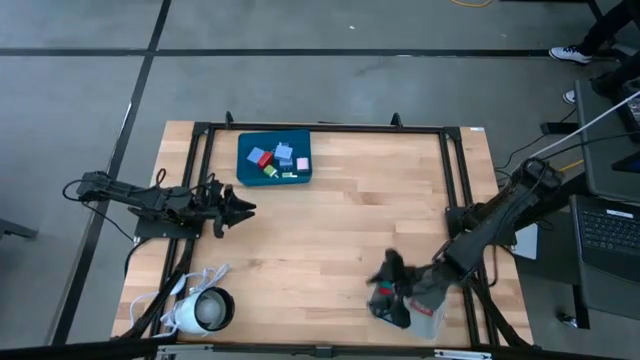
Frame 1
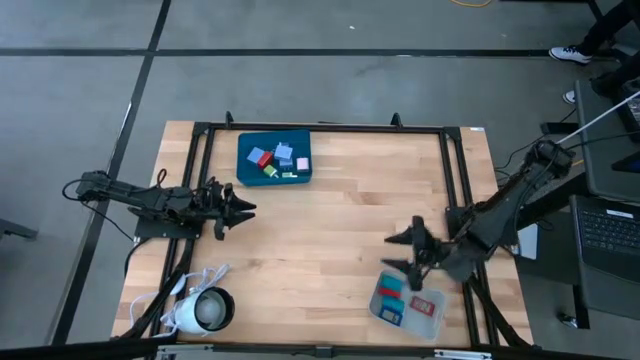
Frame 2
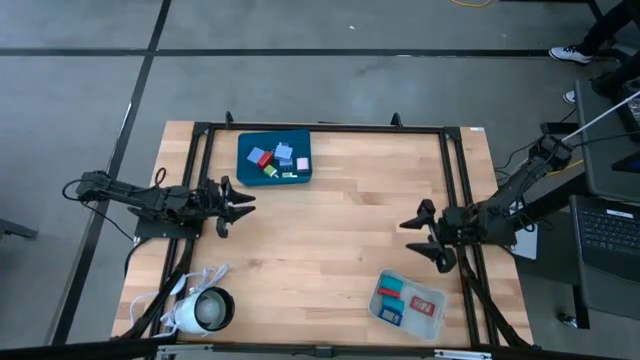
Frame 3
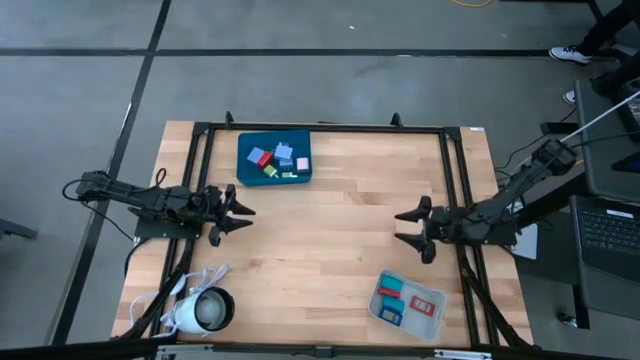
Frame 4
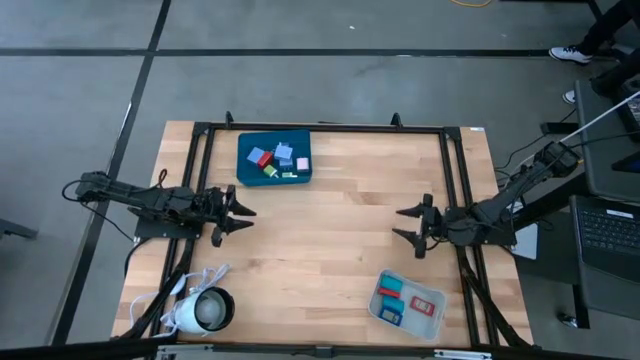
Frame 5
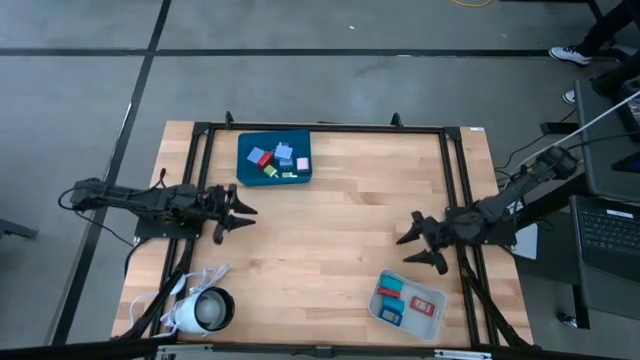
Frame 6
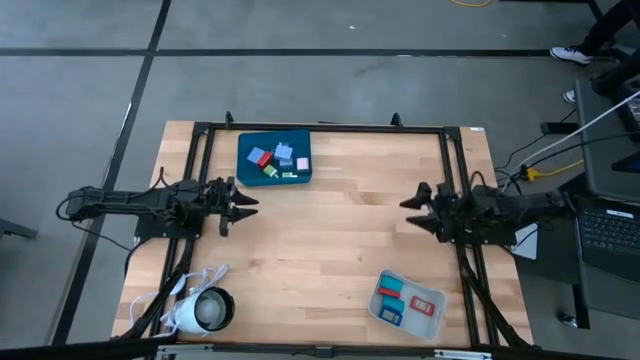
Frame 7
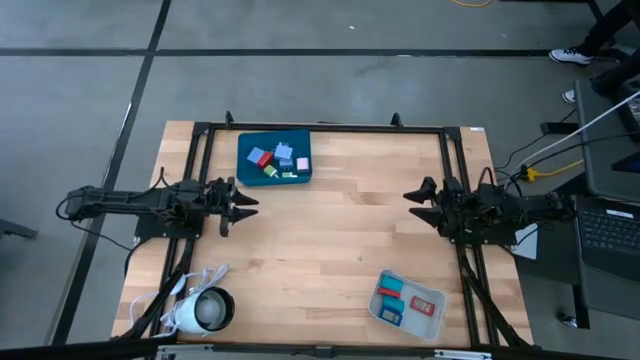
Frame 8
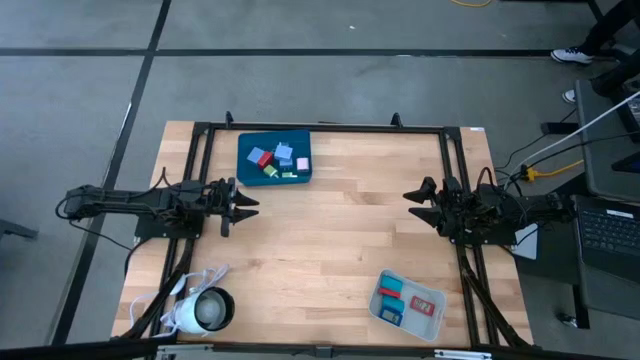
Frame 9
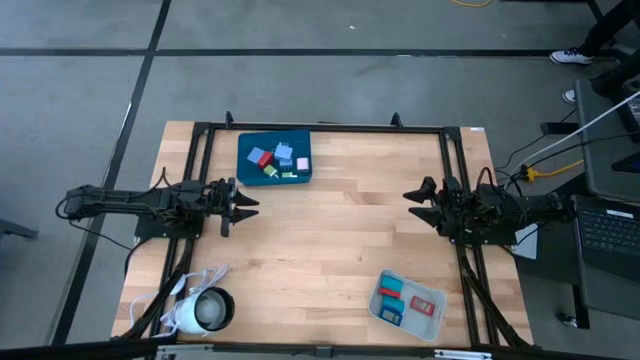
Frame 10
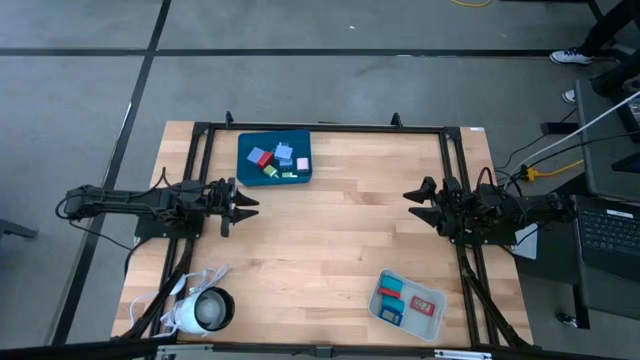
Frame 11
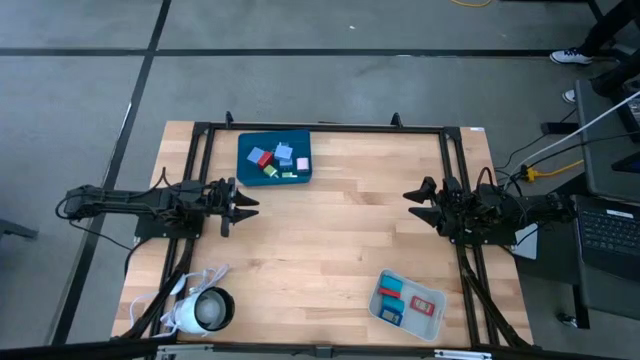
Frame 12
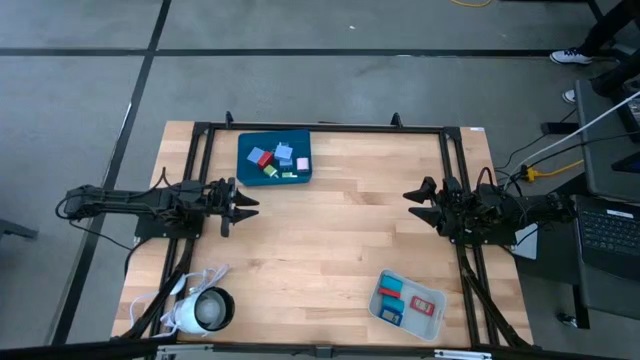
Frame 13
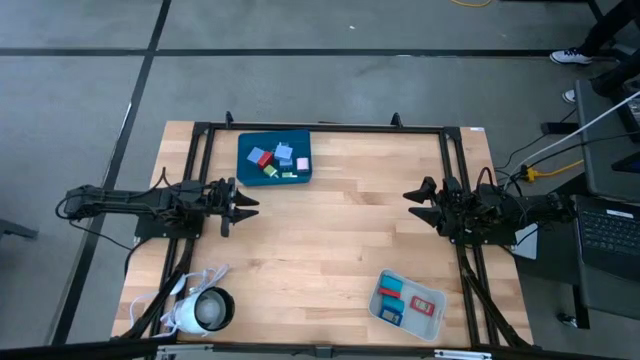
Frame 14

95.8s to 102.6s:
Task: Pick & Place Office items
Return to Home Position

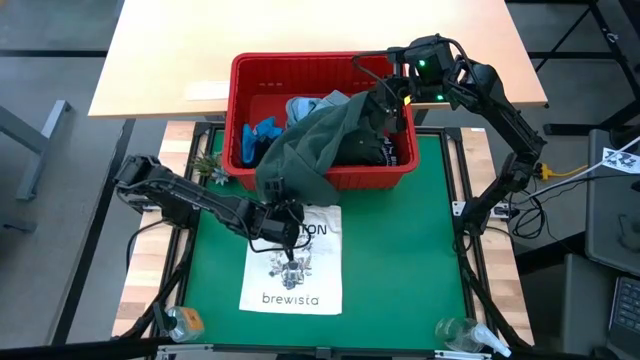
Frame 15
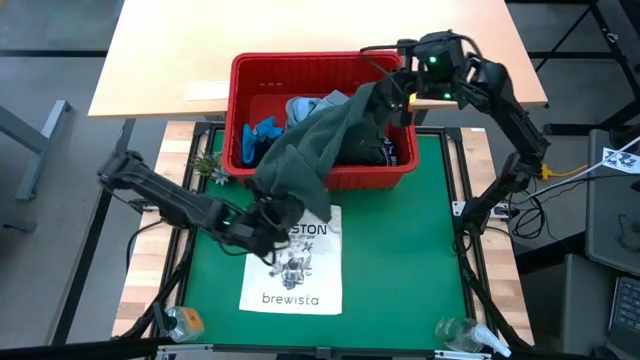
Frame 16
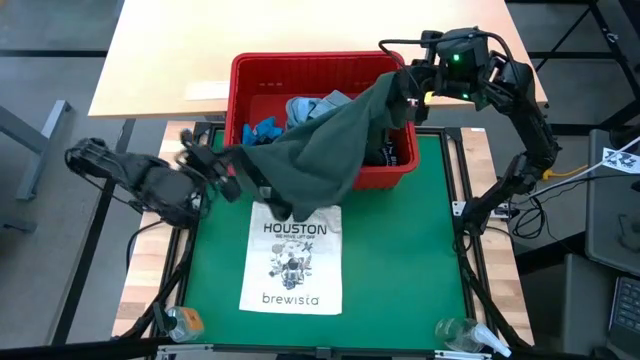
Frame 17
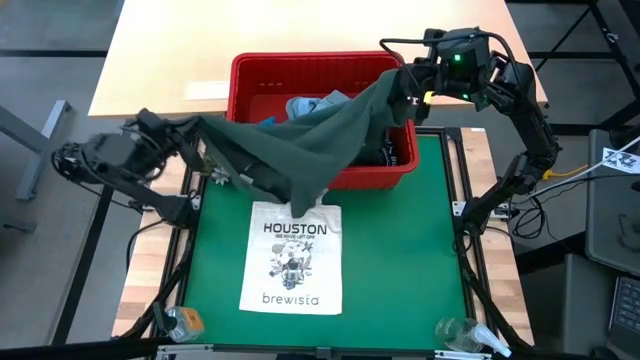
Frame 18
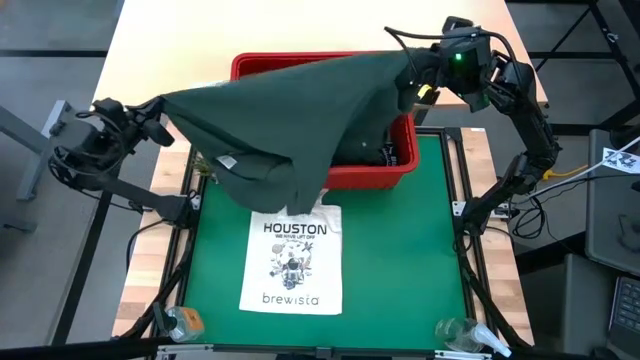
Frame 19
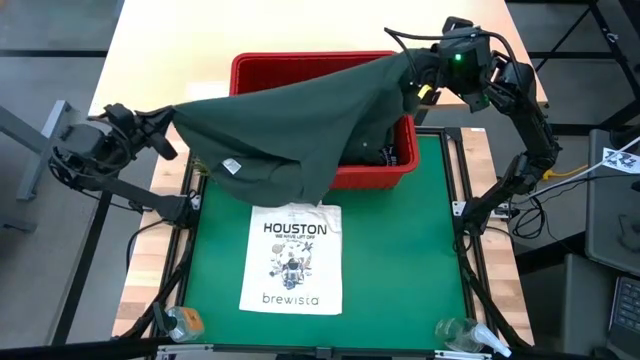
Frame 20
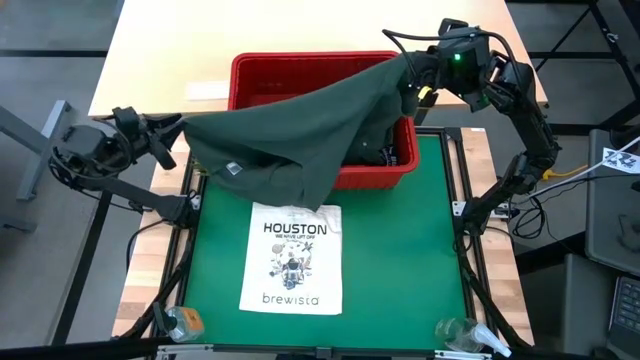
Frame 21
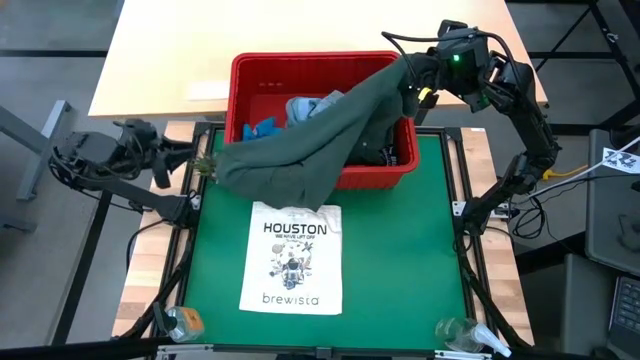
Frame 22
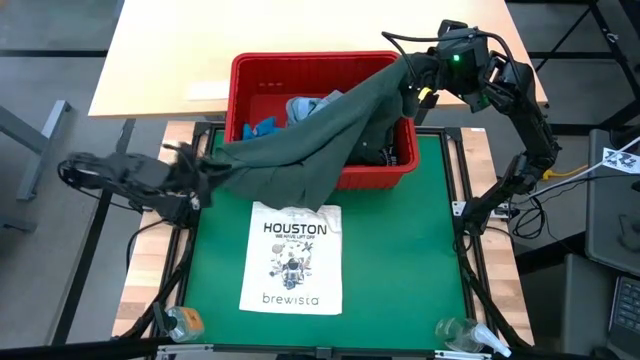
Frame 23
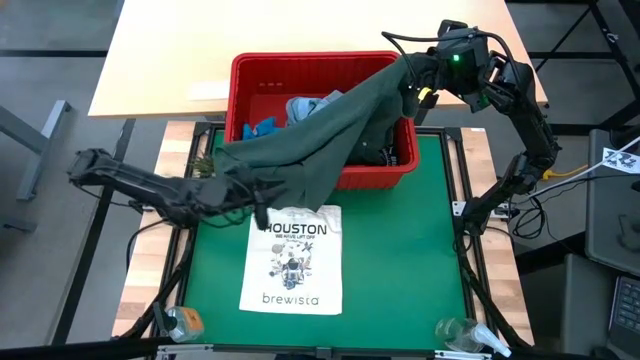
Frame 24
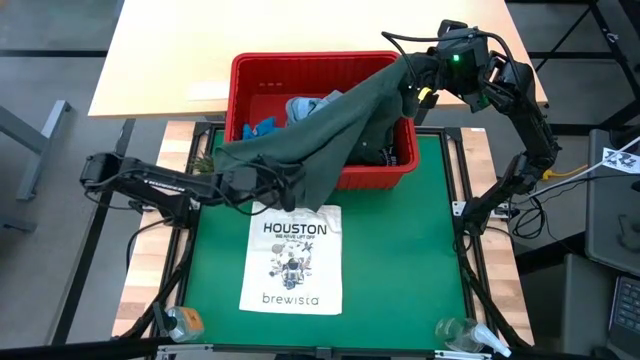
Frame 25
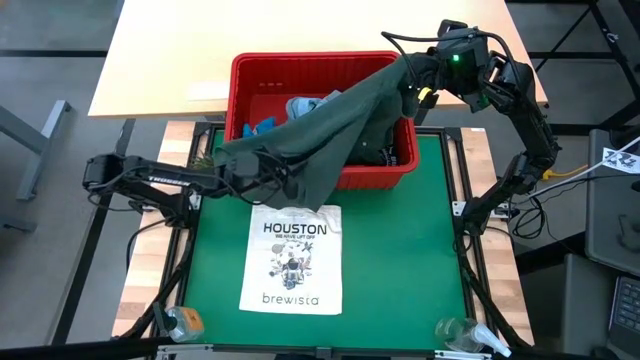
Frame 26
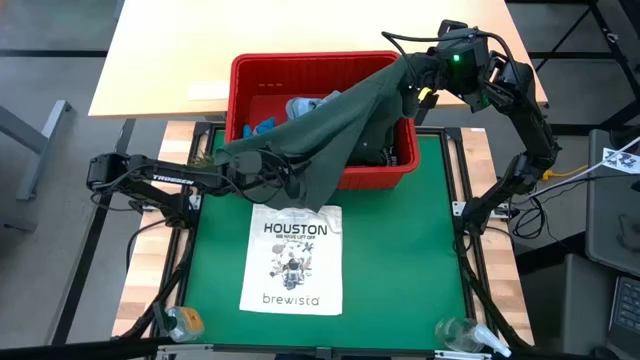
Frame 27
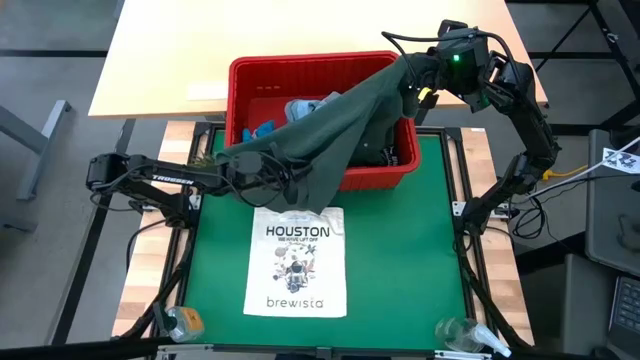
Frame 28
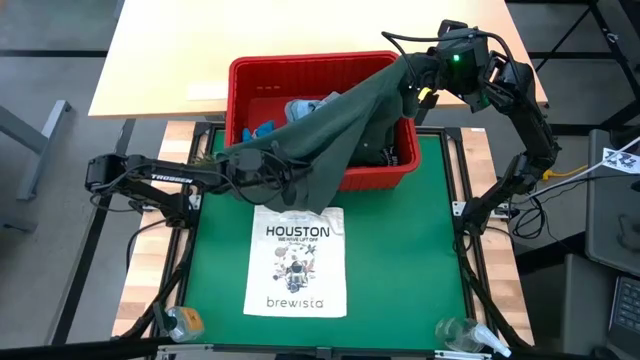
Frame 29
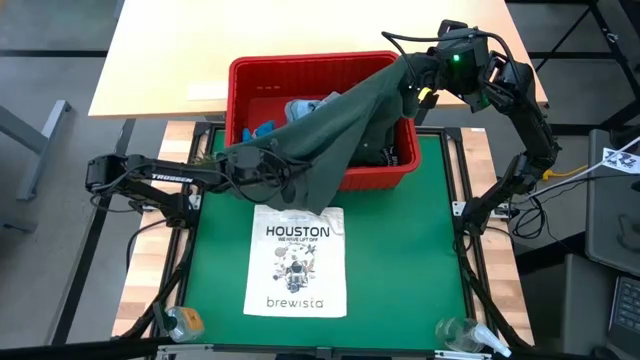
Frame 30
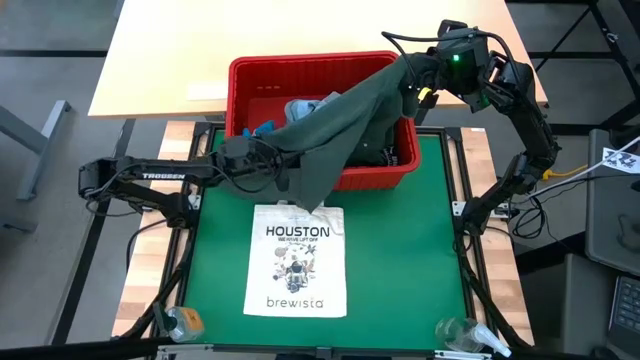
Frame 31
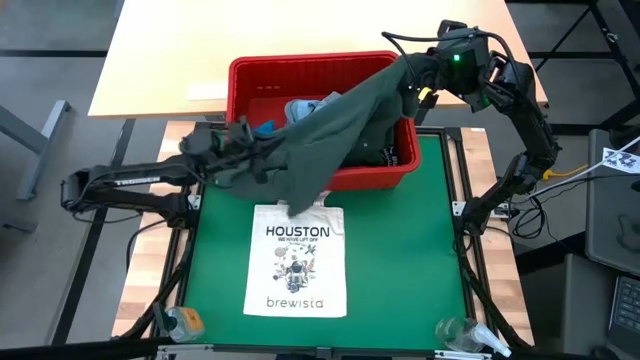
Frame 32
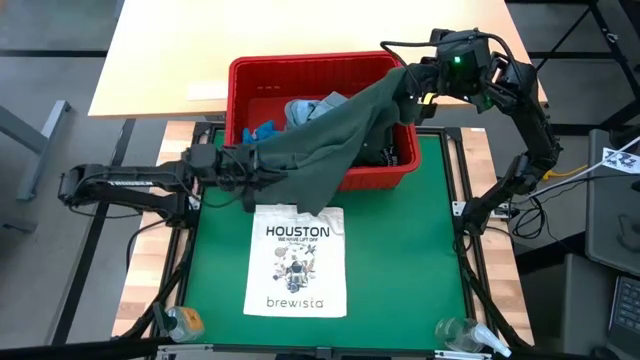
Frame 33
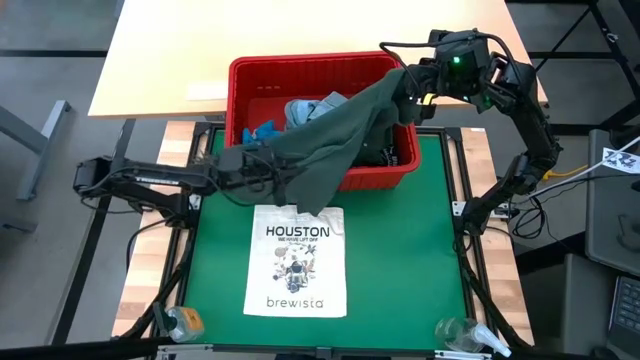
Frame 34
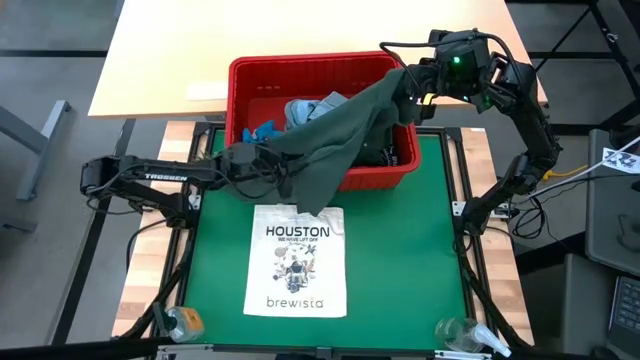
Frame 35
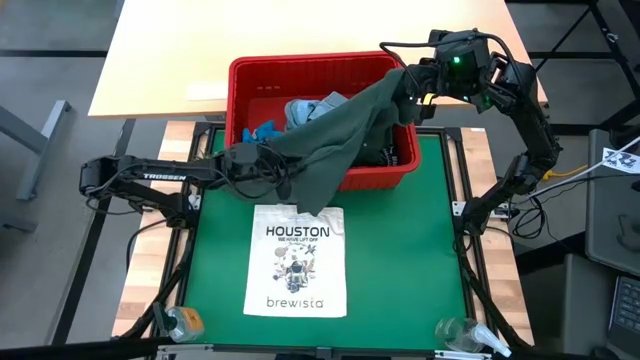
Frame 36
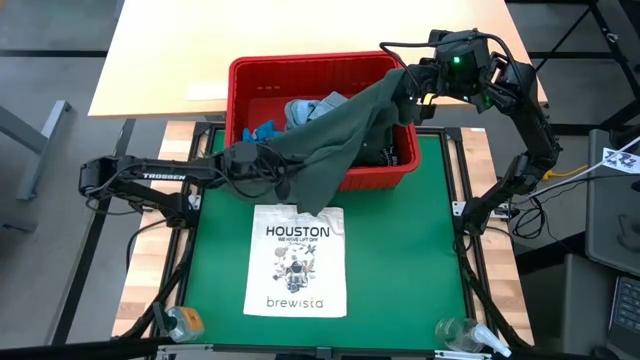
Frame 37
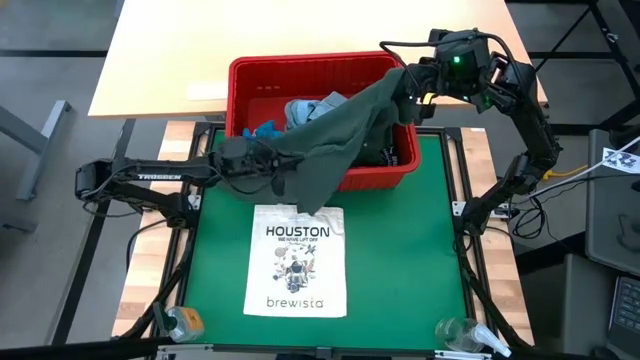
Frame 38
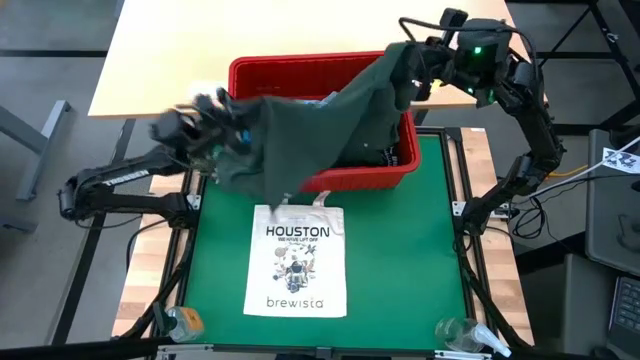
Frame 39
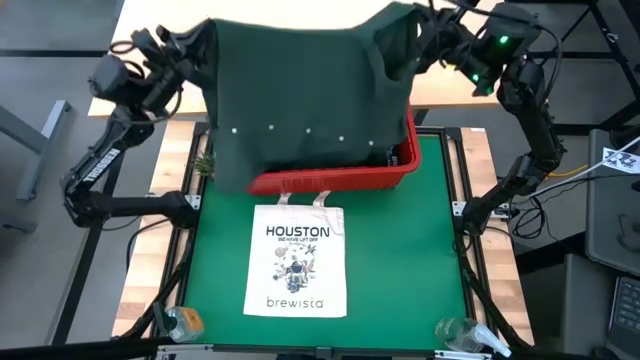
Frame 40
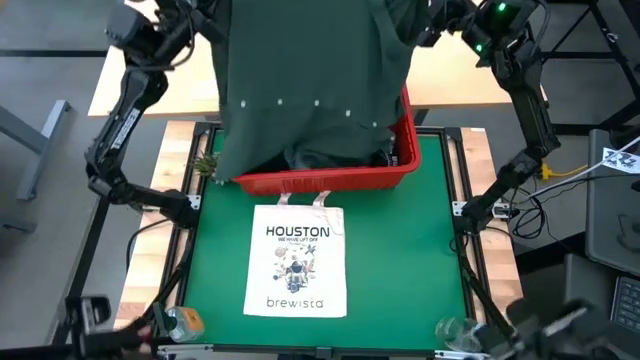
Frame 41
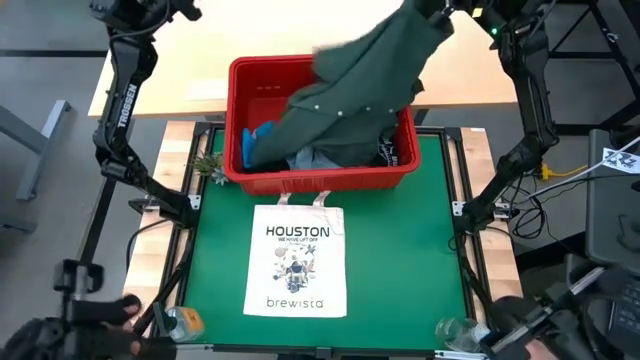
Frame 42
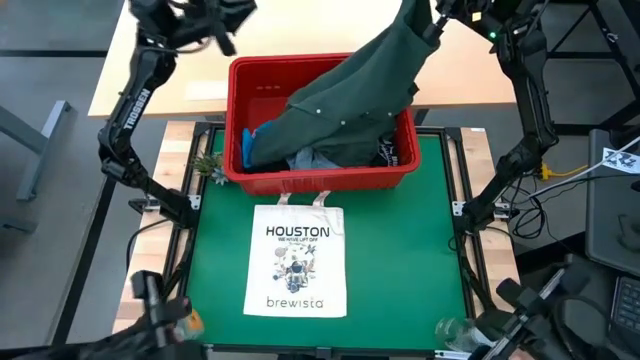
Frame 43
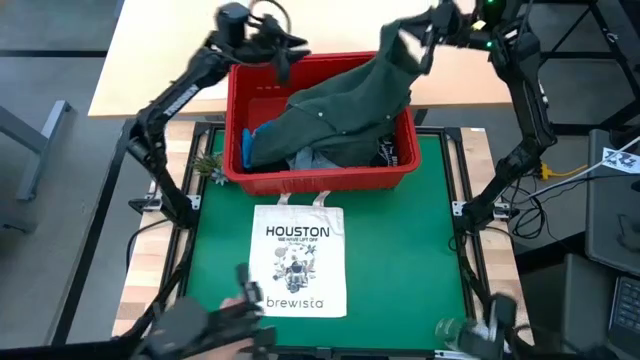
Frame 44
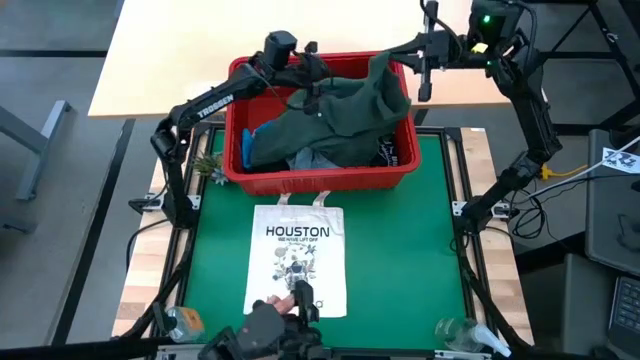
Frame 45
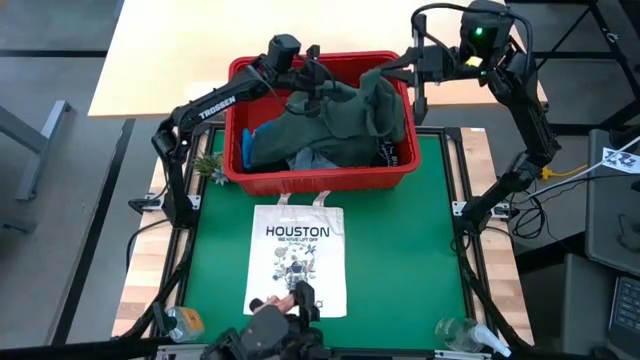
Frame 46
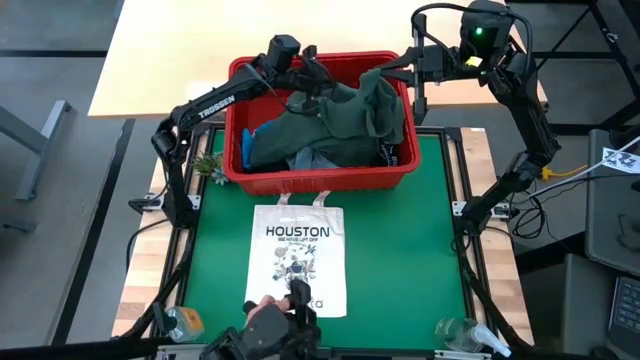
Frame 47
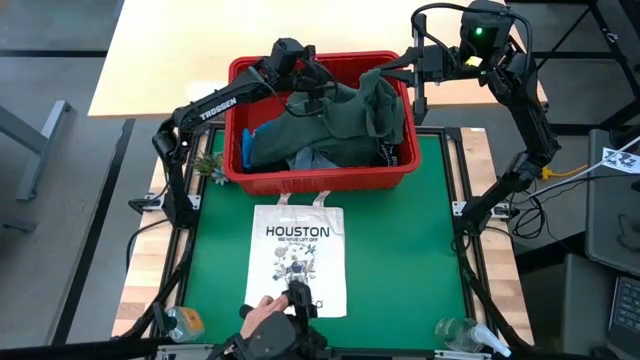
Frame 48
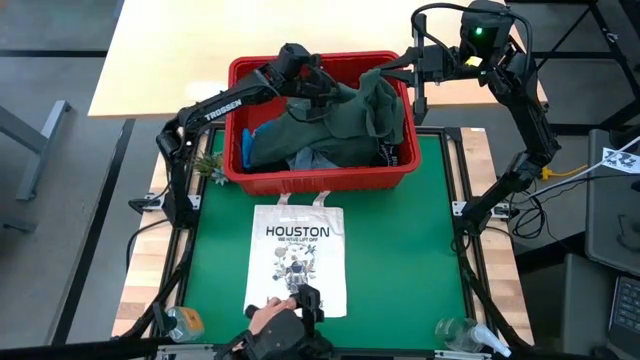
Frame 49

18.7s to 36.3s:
Task: Fold Laundry from Bin
Fold the green t-shirt
